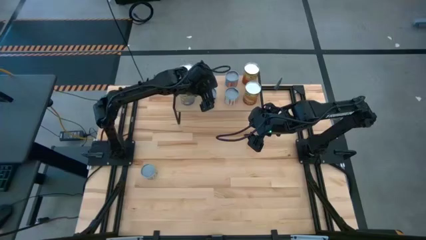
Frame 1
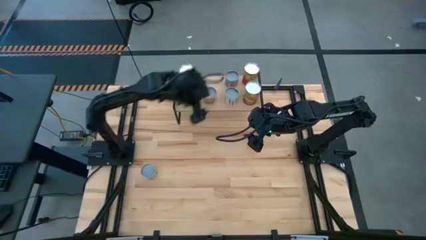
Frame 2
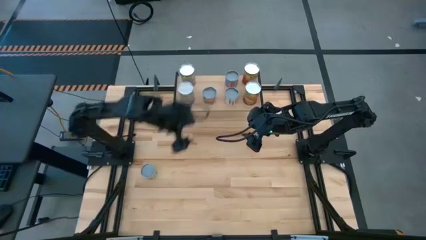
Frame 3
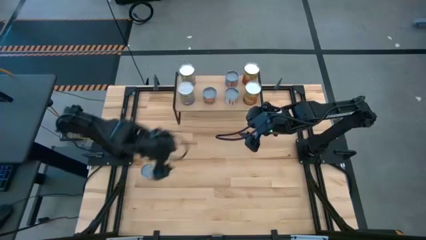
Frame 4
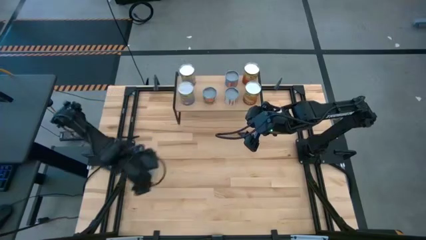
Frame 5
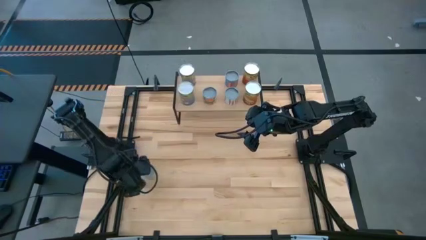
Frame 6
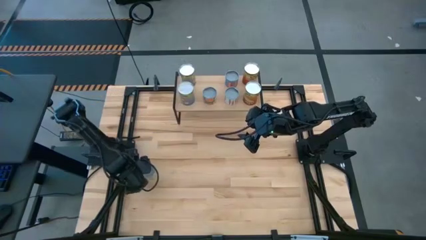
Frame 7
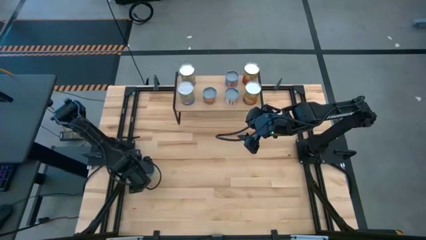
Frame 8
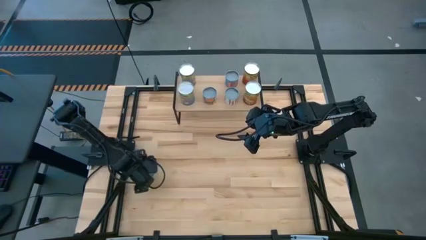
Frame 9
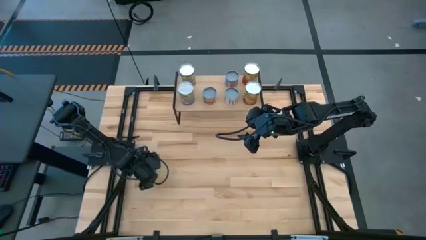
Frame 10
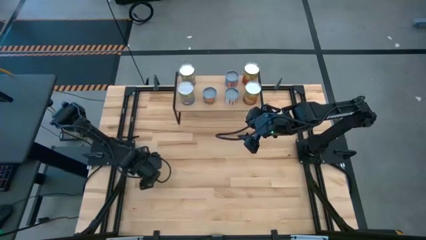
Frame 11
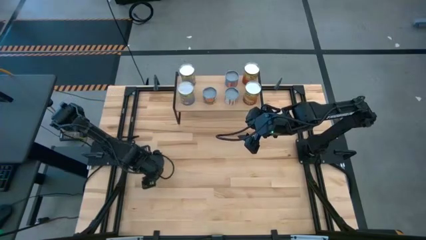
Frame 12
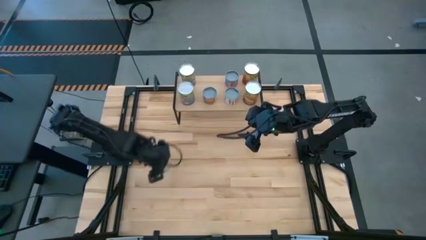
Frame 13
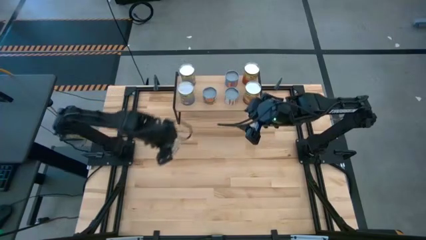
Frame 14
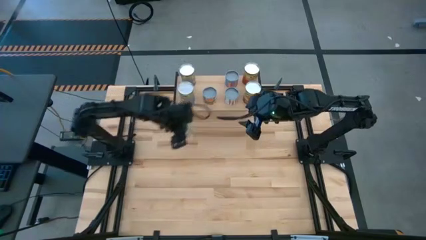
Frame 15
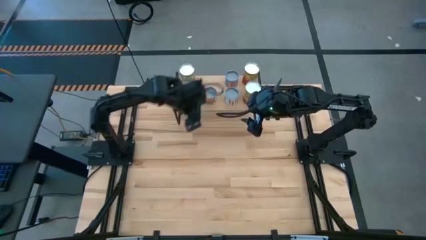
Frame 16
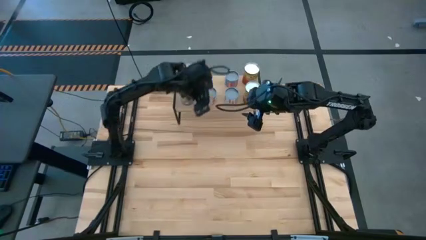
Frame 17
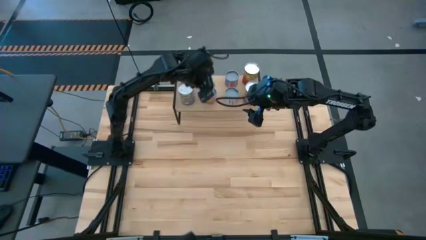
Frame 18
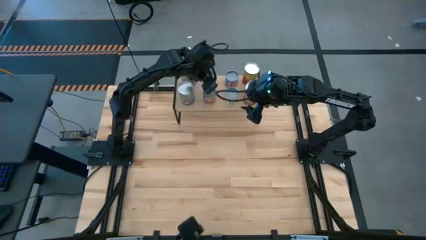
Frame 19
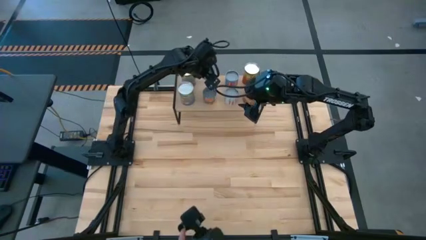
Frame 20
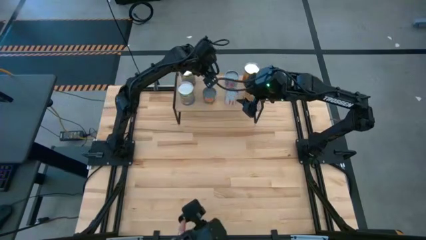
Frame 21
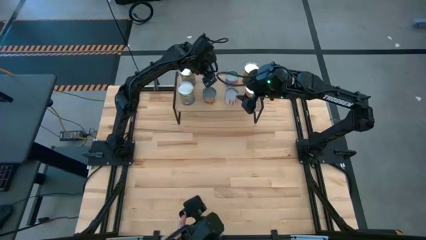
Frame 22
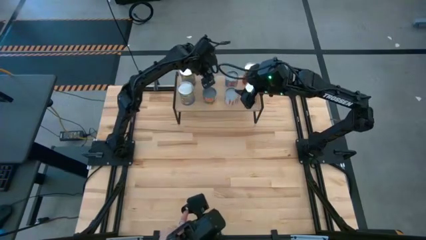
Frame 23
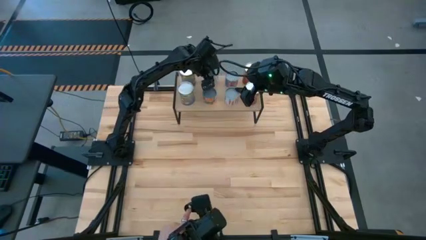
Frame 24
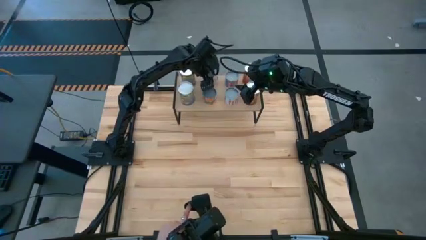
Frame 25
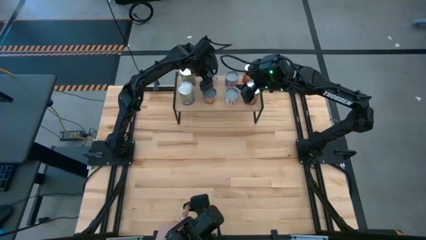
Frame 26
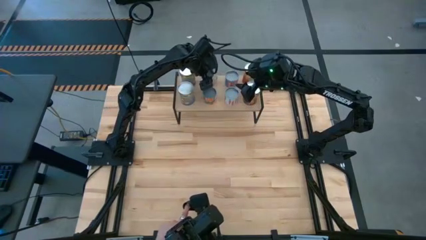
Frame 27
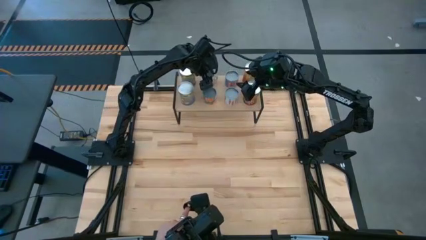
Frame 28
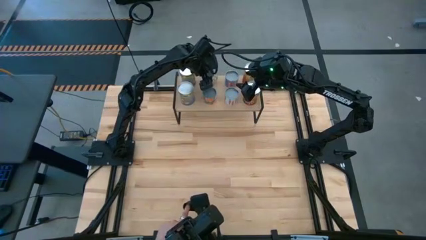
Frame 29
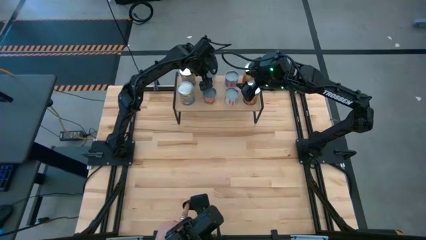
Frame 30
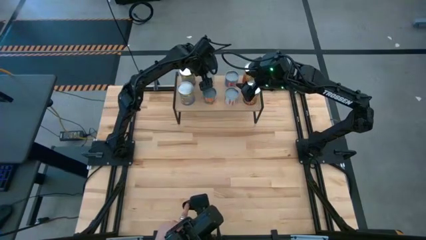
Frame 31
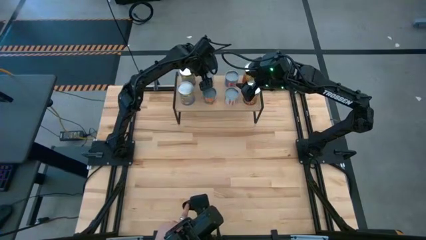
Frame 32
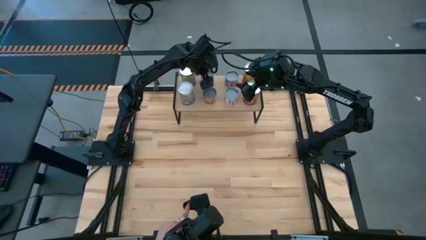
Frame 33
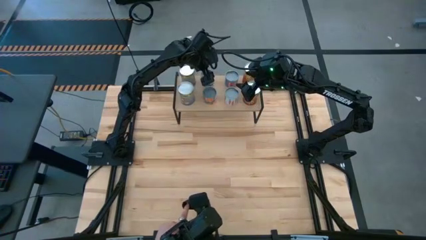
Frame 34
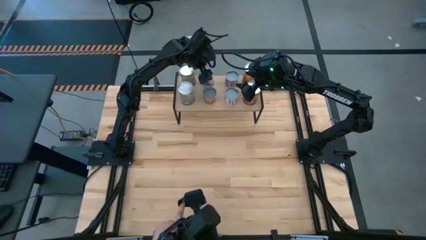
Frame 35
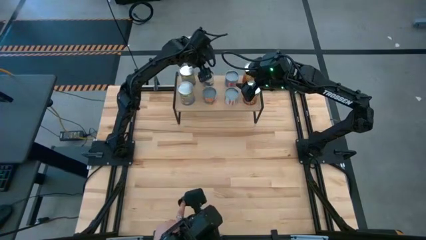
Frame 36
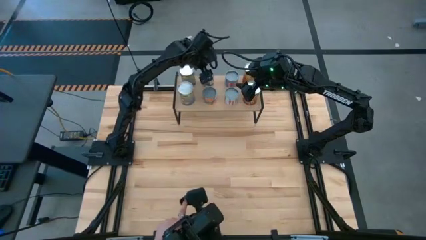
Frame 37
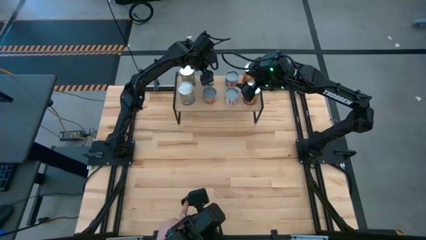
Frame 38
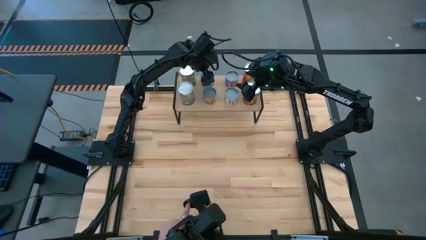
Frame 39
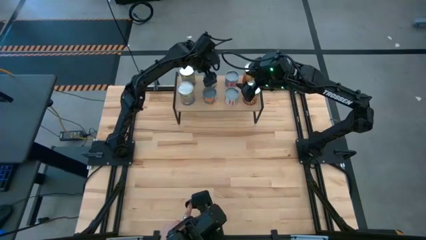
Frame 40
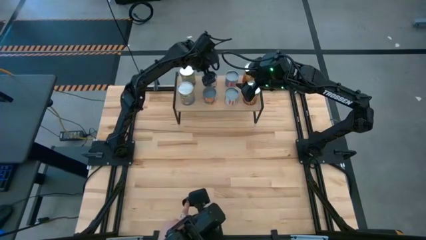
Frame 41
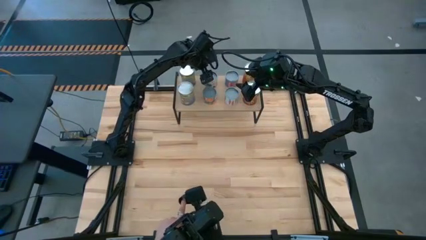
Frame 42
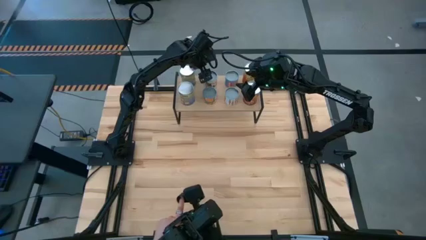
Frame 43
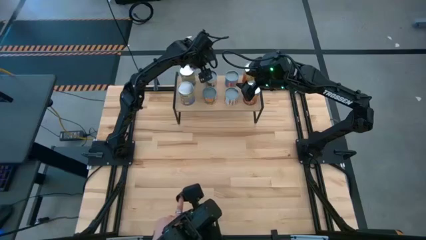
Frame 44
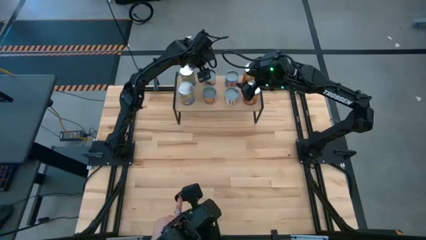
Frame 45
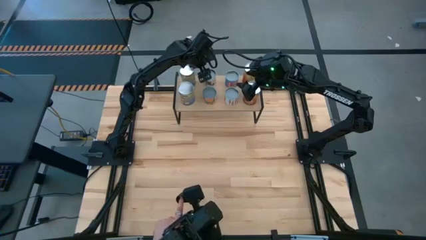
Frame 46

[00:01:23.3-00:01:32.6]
Task: Pick and place cans onto a shelf
Put the canned green peas on the shelf

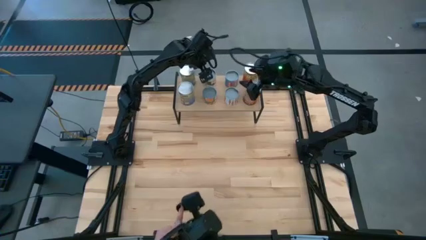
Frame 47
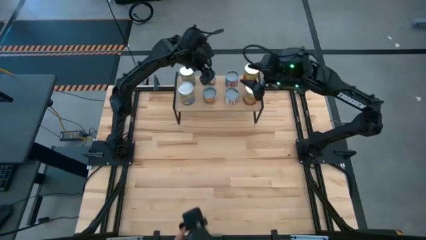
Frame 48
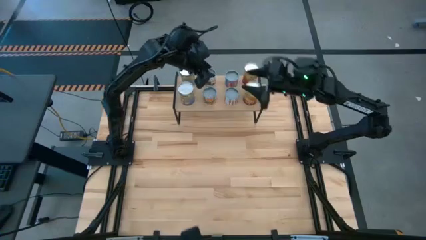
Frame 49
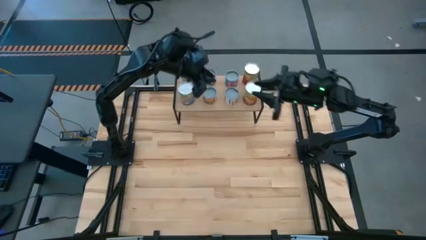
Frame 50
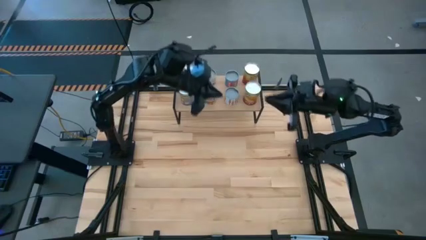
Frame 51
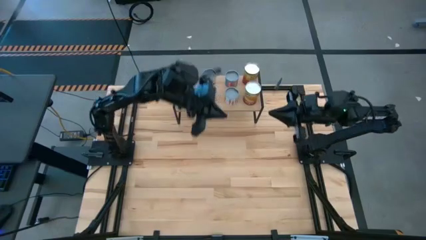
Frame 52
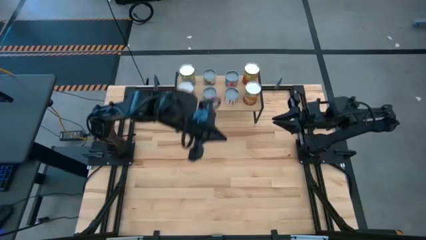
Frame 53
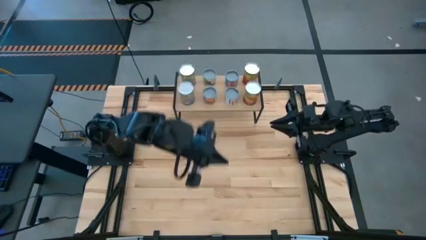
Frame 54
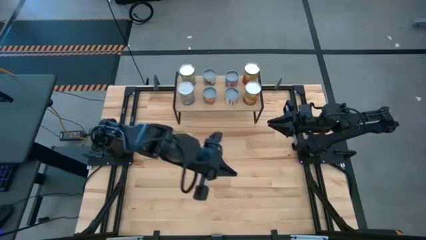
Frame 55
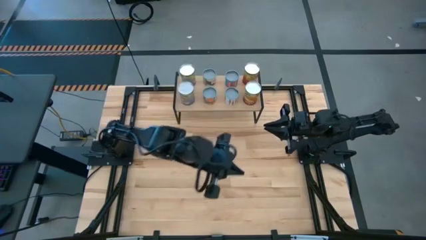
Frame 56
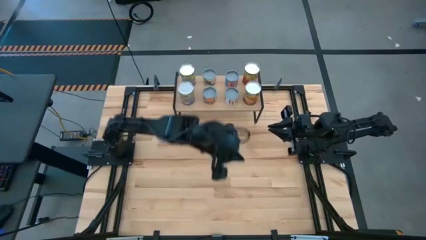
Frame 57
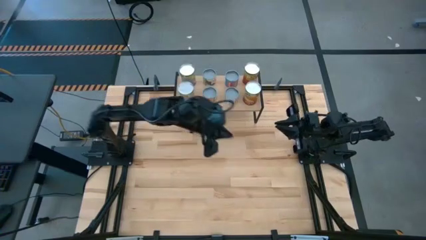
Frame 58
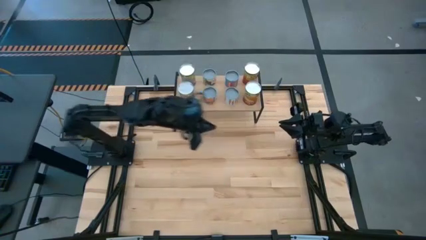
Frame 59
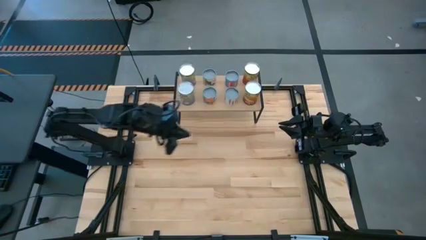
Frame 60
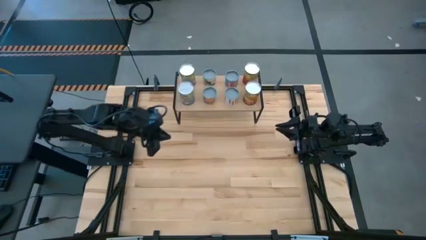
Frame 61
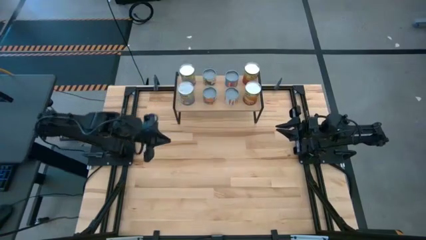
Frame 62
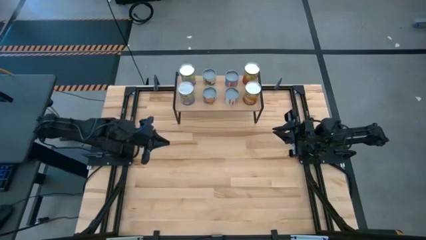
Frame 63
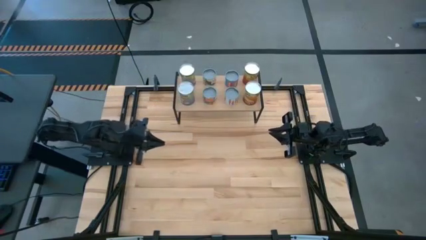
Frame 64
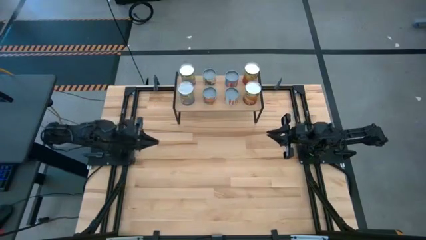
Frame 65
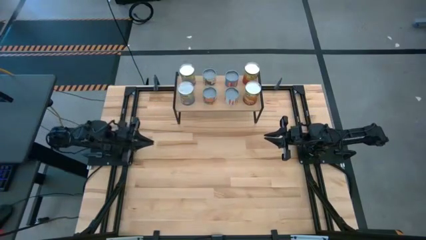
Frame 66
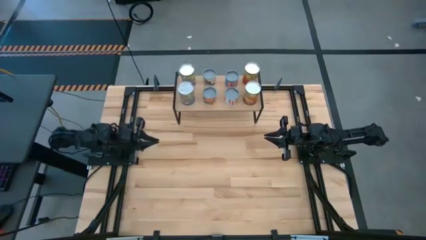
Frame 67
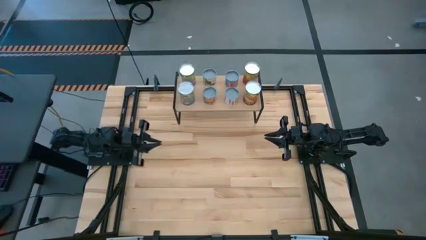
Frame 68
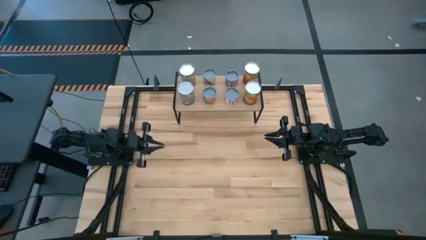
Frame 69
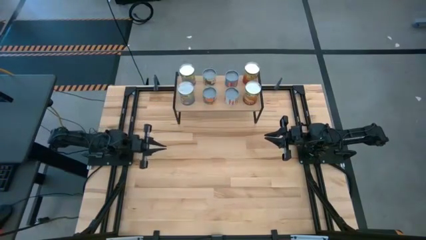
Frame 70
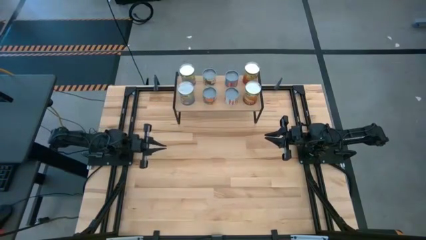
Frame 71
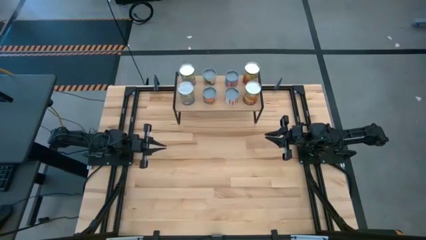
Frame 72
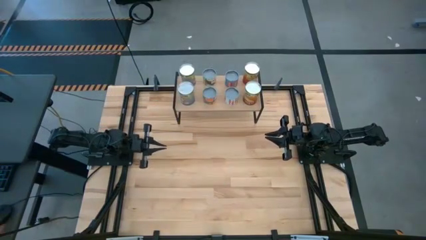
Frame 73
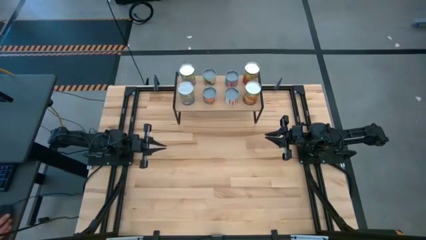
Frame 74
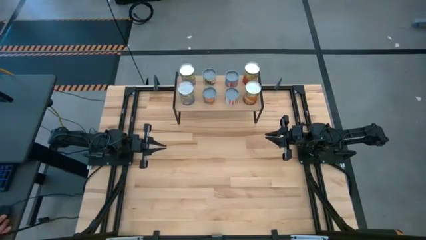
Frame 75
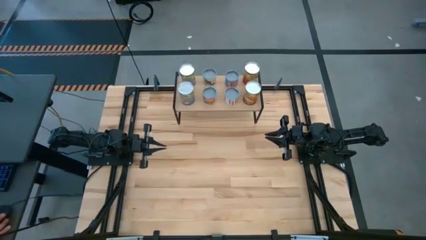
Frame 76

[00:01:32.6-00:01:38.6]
Return to Home Position
